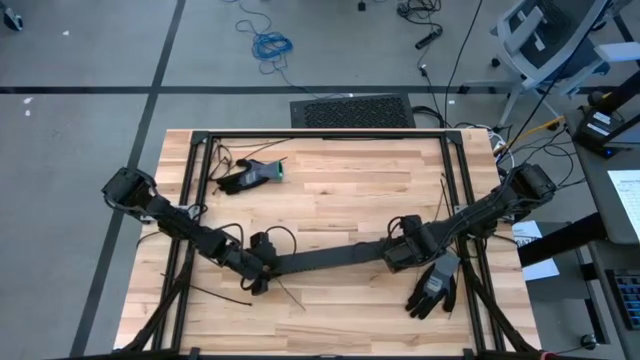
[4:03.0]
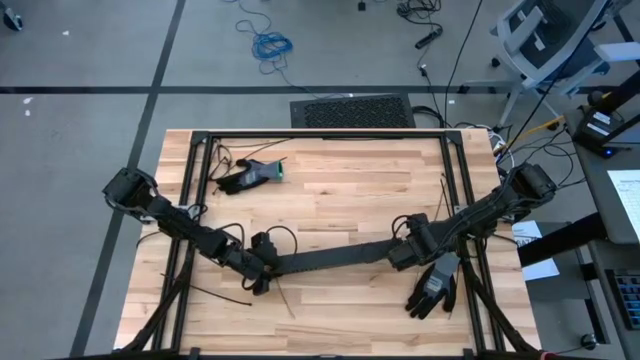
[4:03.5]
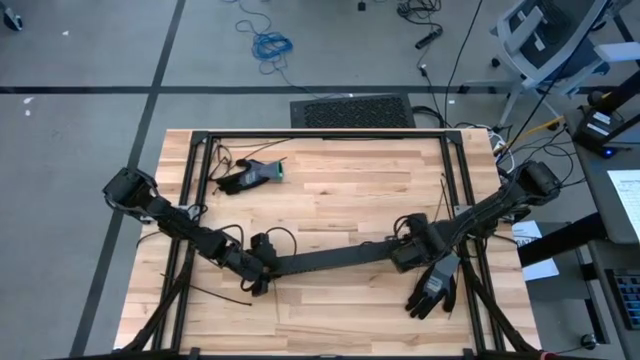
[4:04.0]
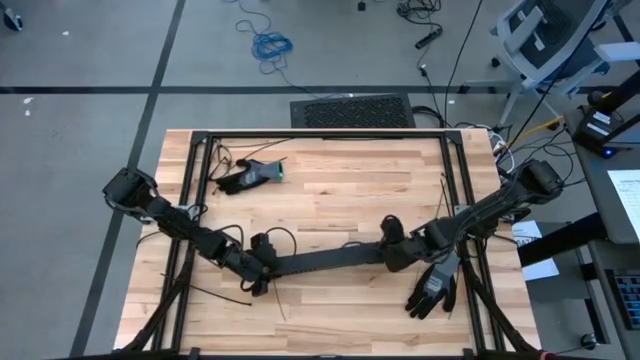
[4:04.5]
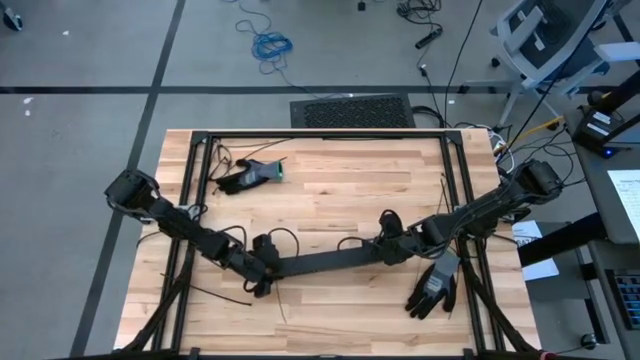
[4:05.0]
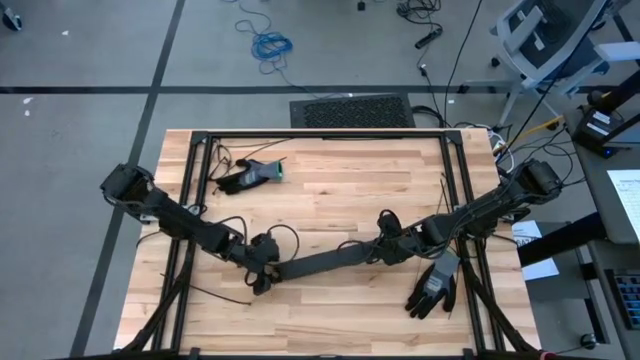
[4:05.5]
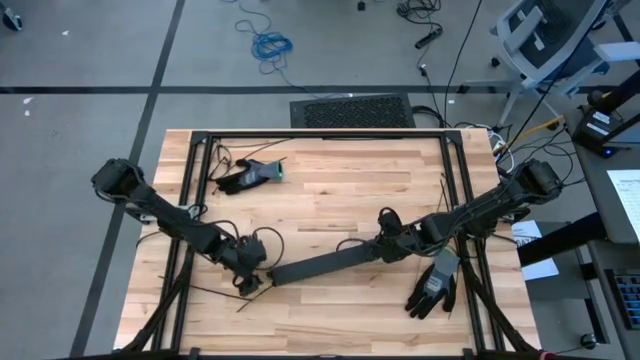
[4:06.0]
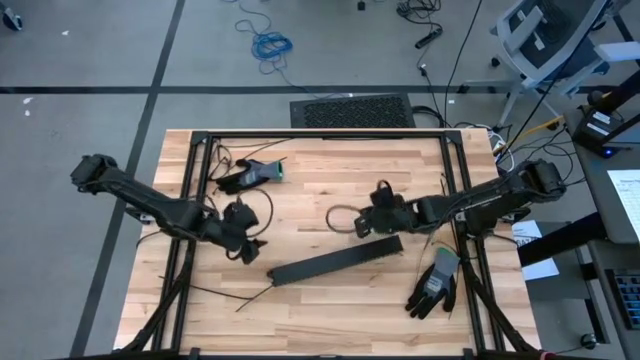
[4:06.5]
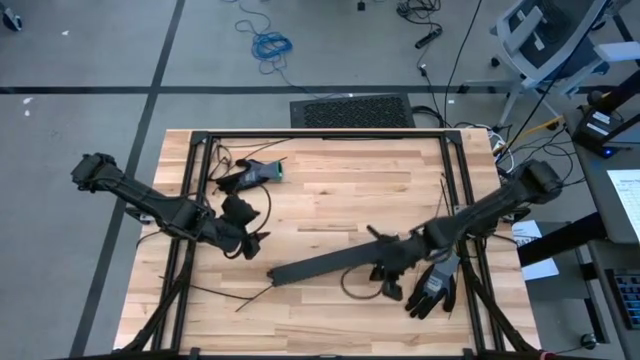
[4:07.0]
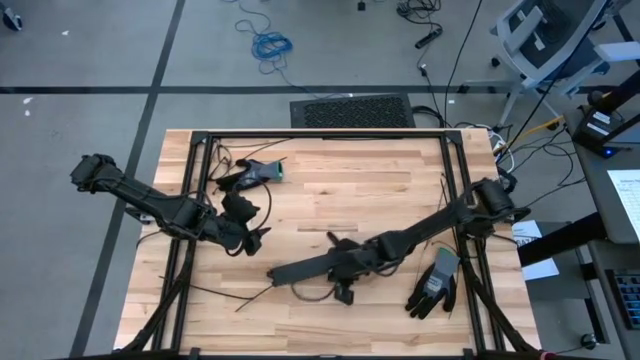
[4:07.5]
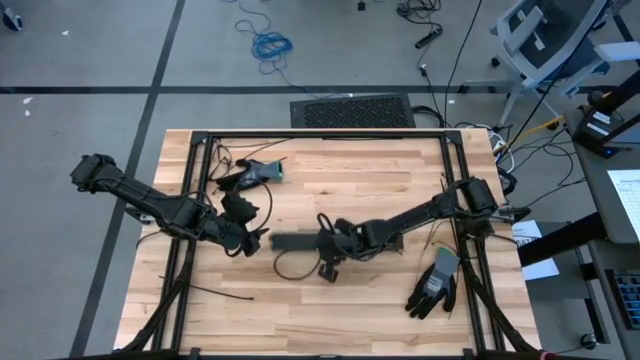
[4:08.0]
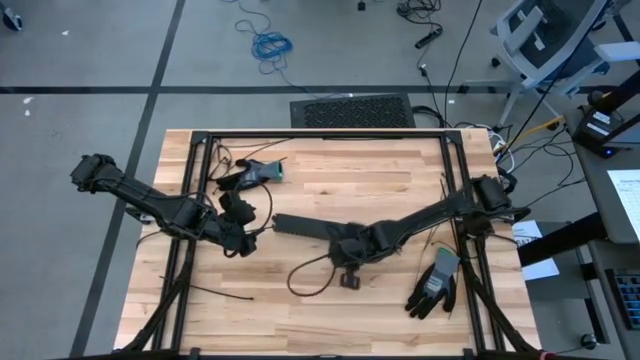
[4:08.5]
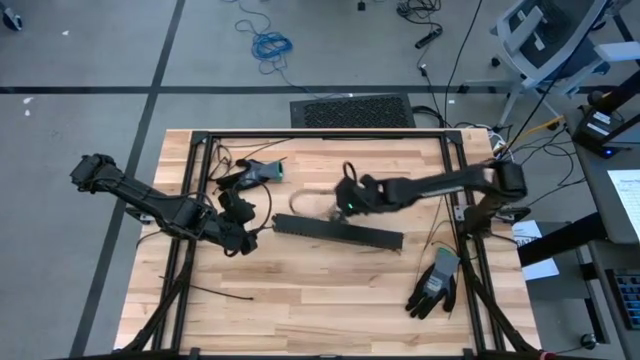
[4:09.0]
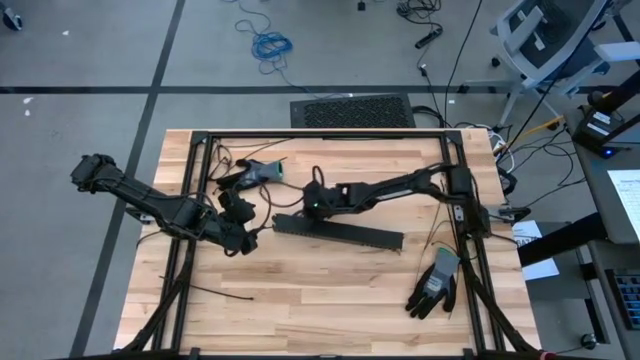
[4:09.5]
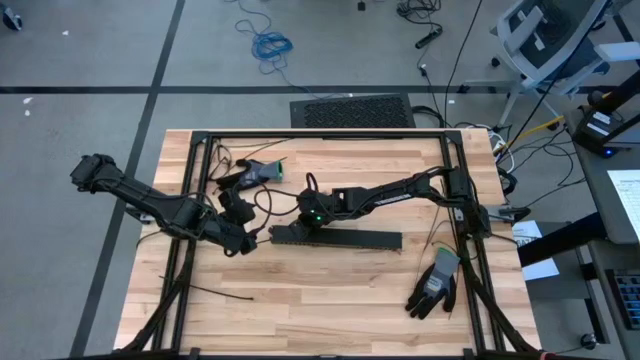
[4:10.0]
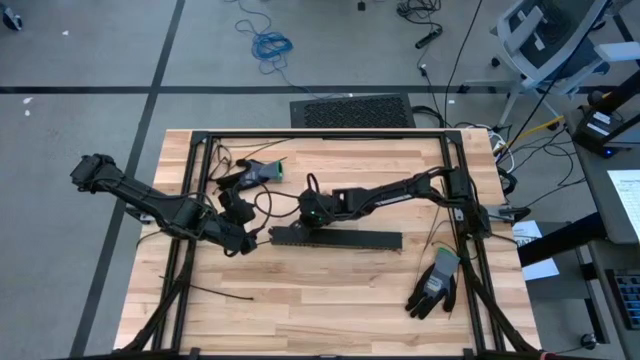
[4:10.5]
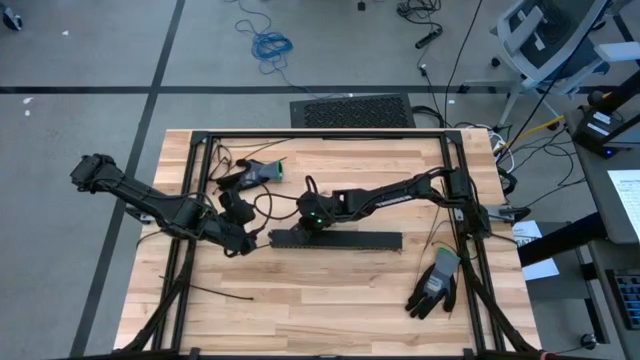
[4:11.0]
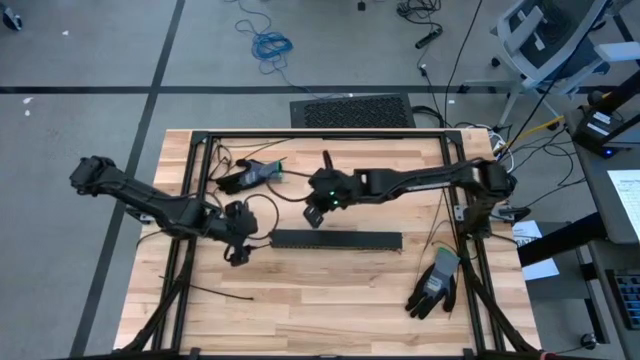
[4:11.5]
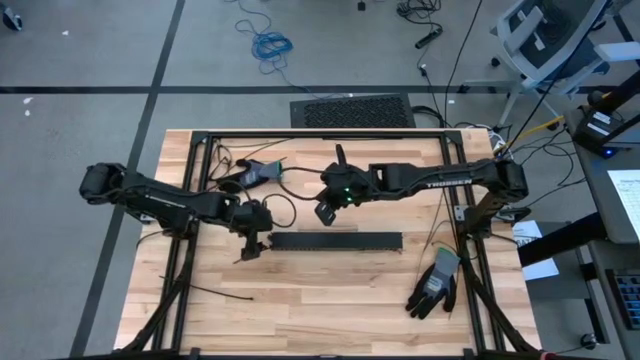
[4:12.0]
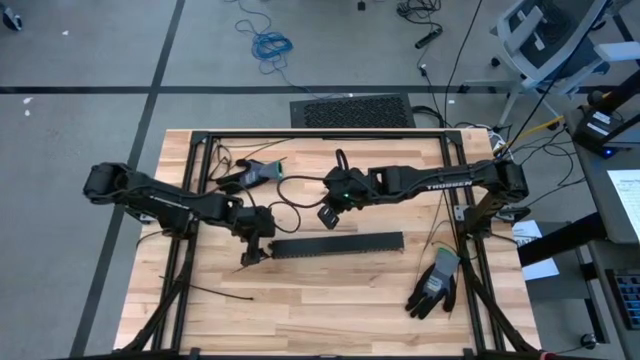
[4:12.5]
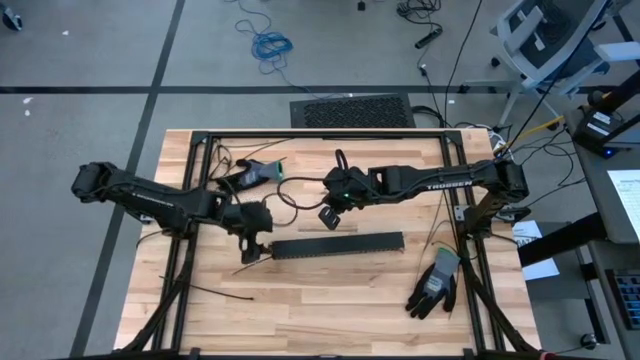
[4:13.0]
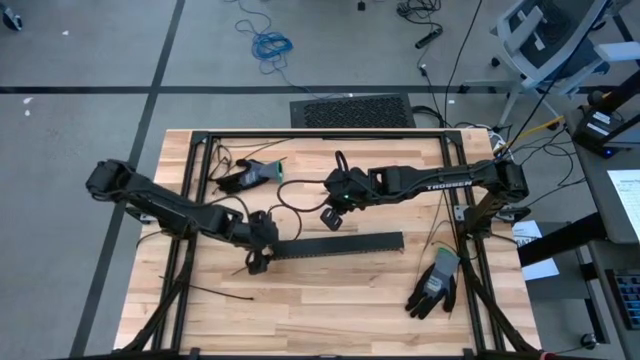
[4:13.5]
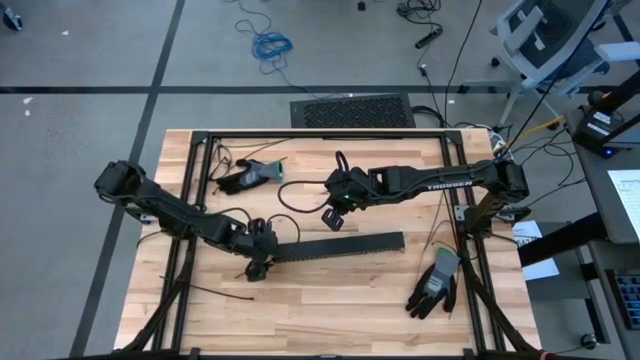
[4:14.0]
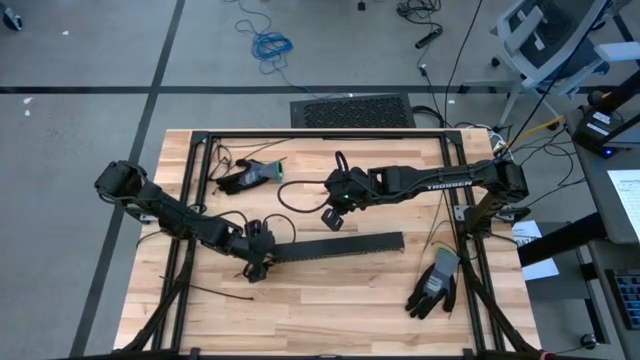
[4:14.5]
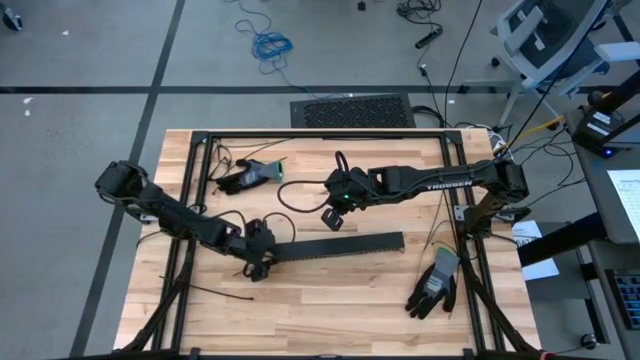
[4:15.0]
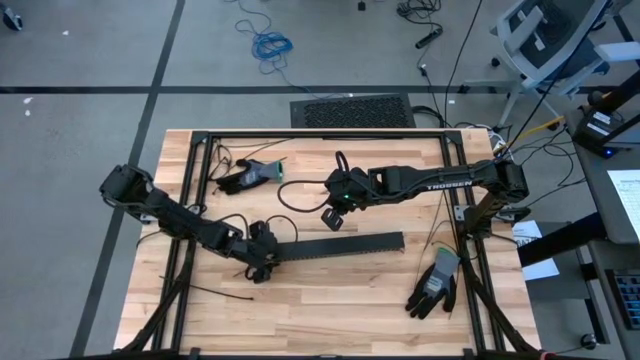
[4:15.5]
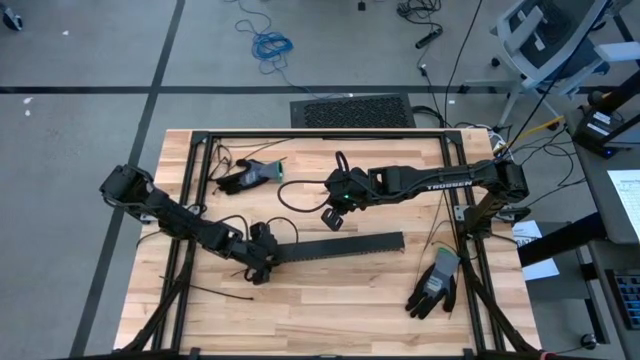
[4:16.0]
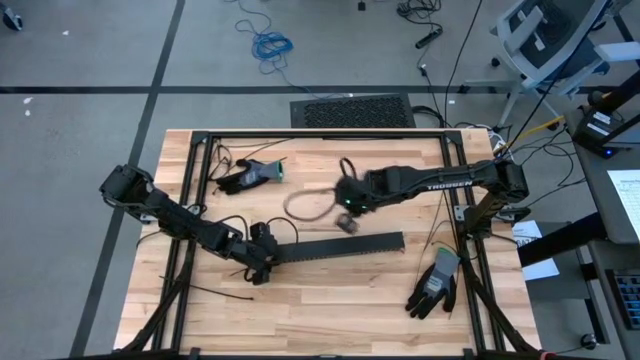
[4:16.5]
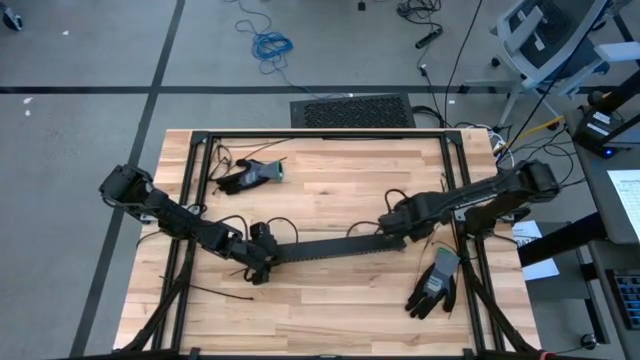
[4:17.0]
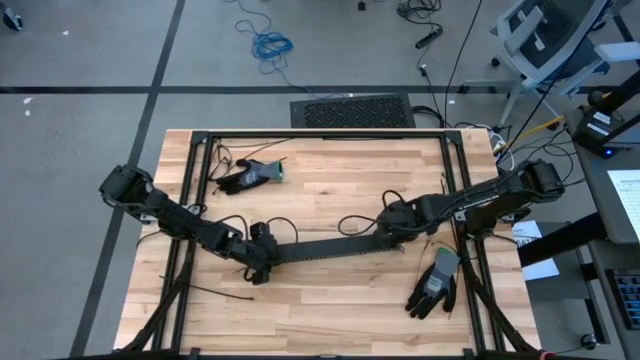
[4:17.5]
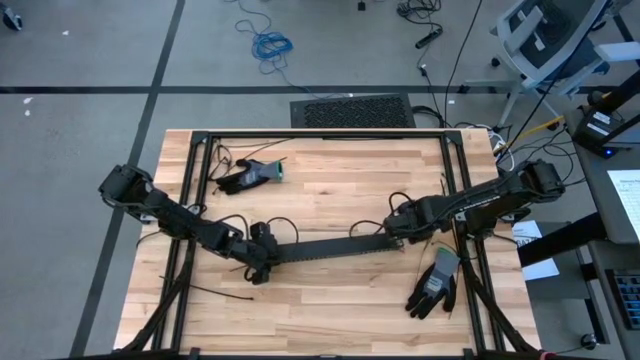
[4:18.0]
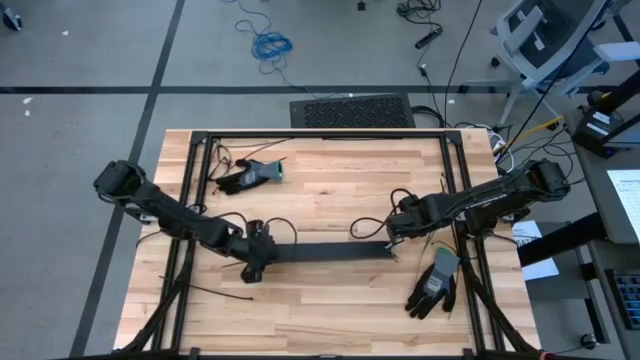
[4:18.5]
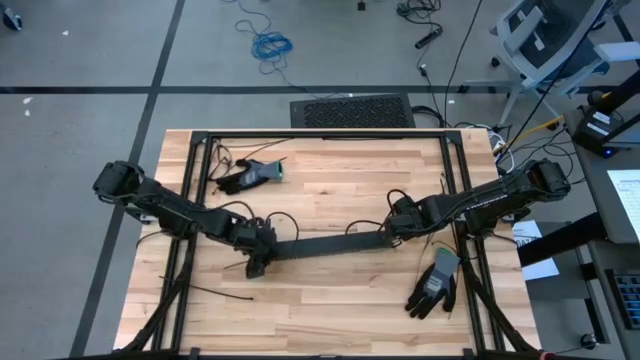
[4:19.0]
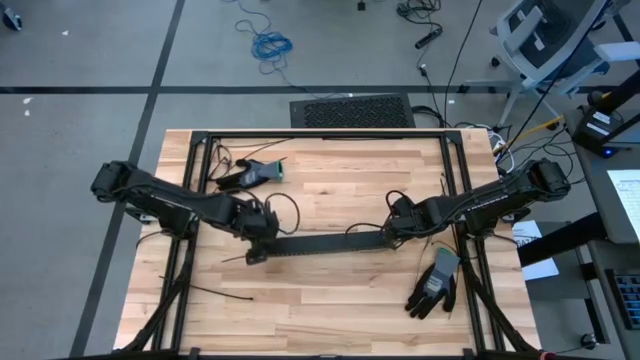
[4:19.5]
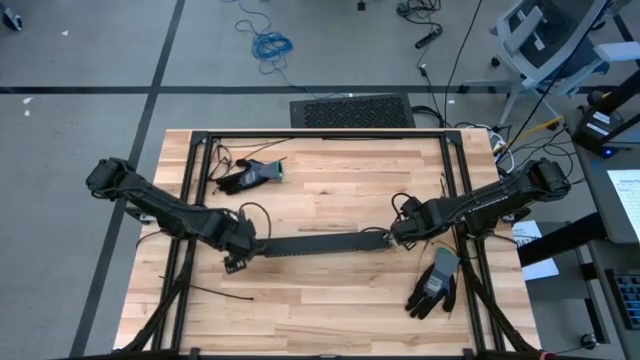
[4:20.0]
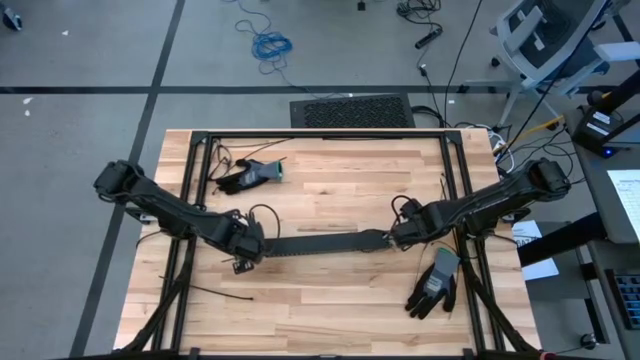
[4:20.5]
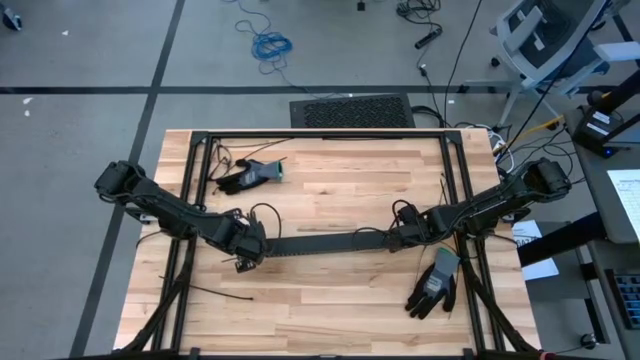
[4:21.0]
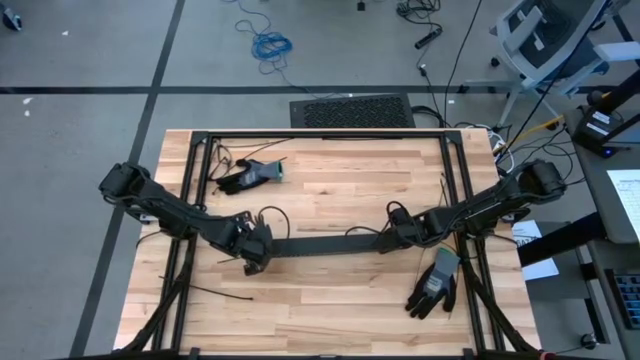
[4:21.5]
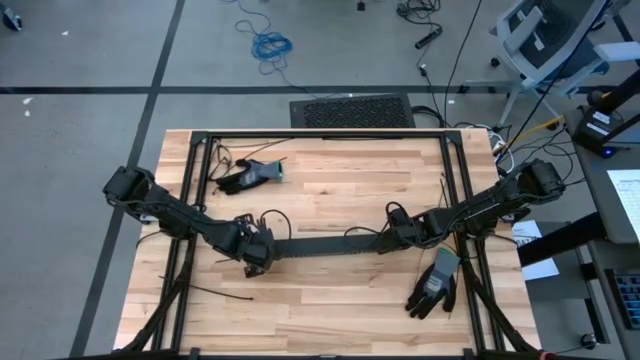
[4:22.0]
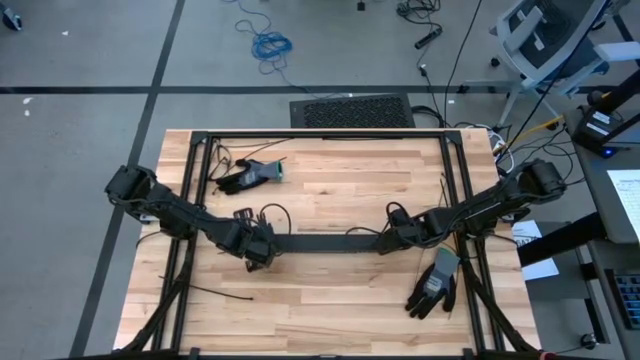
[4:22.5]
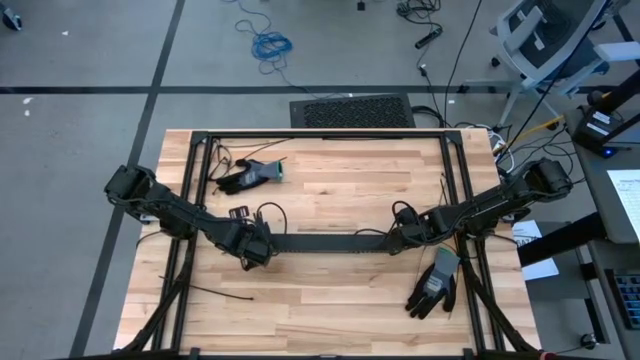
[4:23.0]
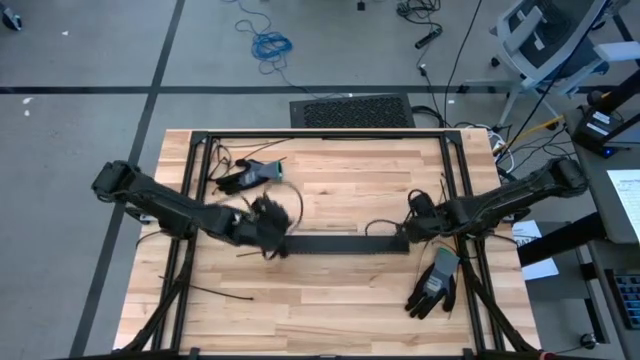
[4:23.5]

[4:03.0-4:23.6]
Task: Ziptie cables
Close the black cable duct

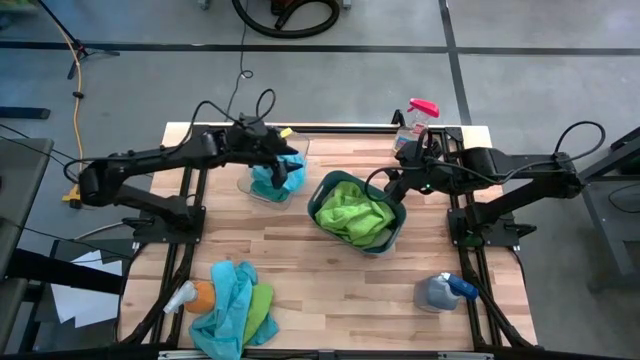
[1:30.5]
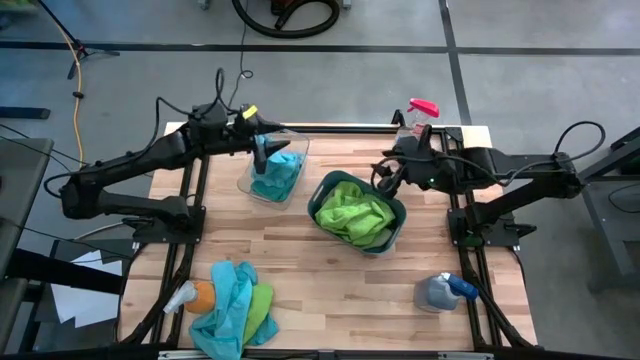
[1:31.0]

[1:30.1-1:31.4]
Task: Sort microfiber towel by color & place in baskets
Put the blue microfiber towel into the transparent bin
